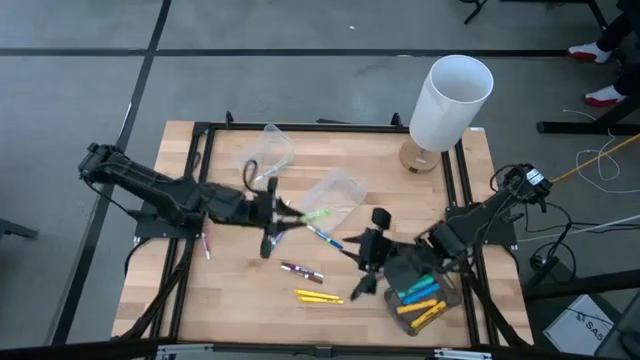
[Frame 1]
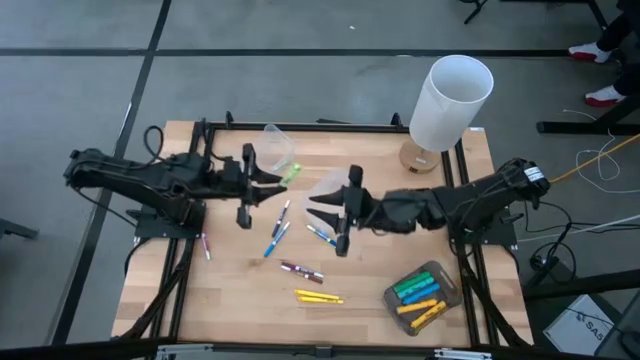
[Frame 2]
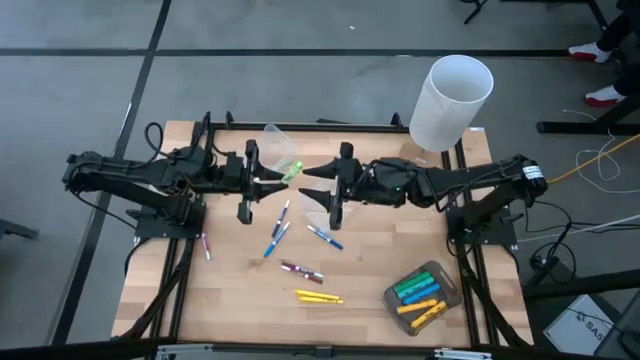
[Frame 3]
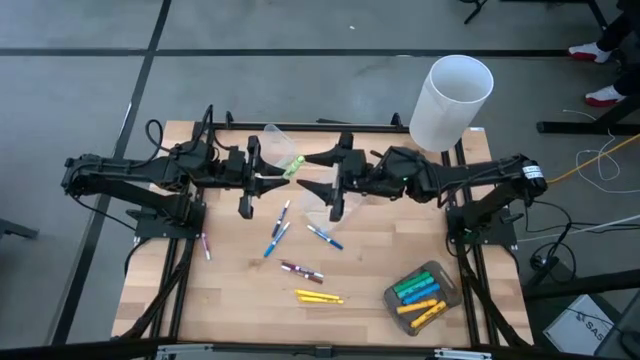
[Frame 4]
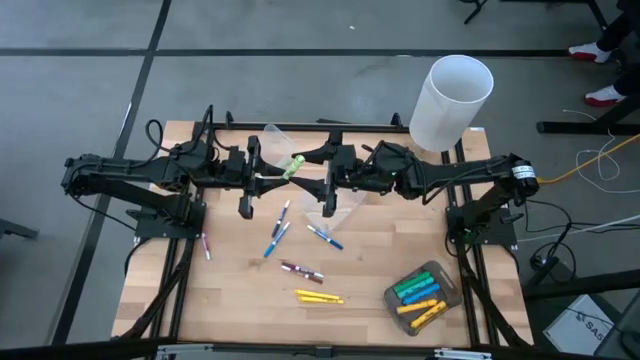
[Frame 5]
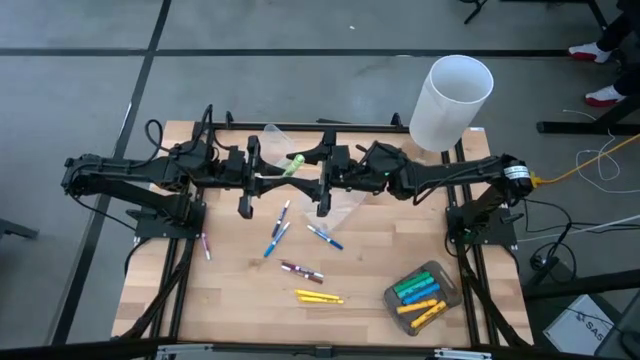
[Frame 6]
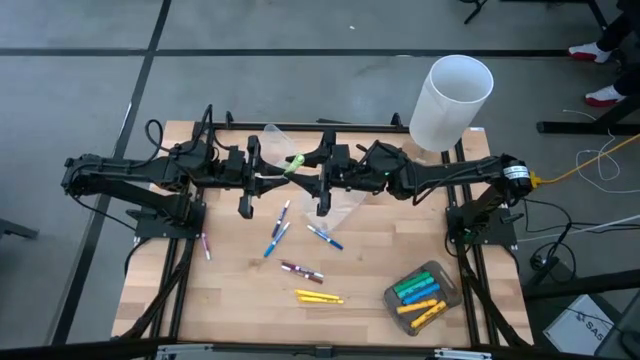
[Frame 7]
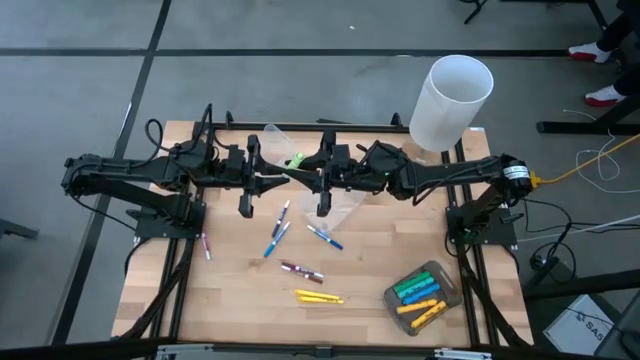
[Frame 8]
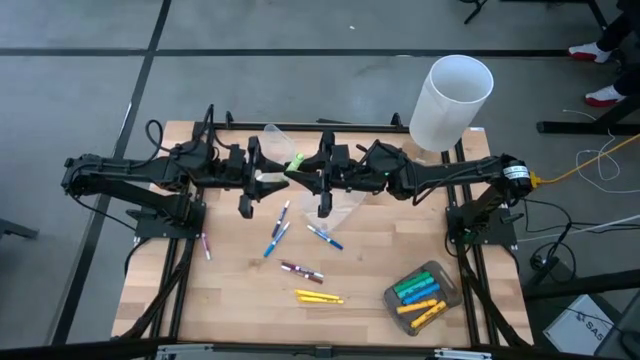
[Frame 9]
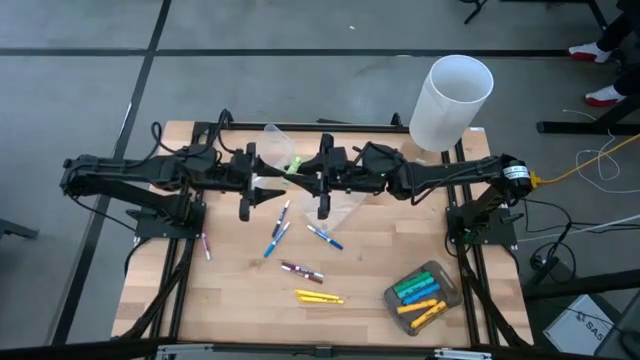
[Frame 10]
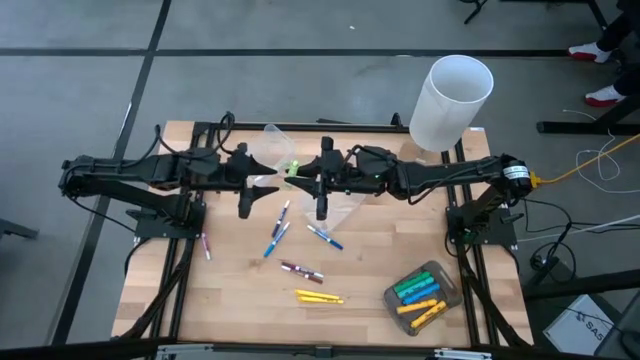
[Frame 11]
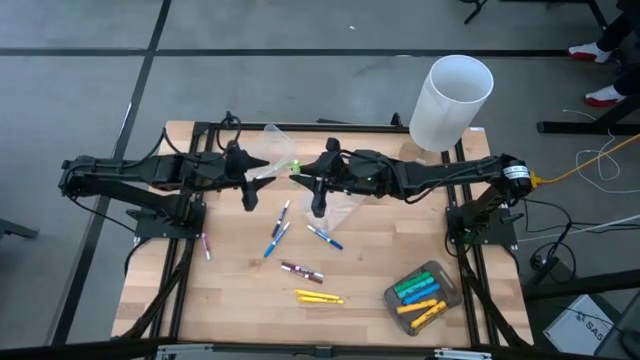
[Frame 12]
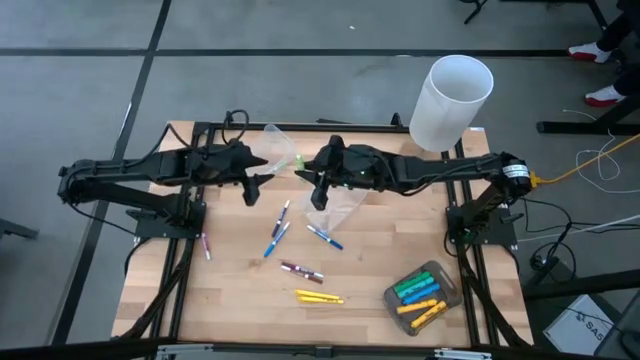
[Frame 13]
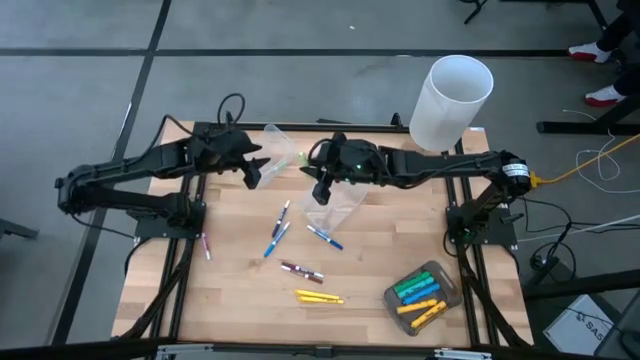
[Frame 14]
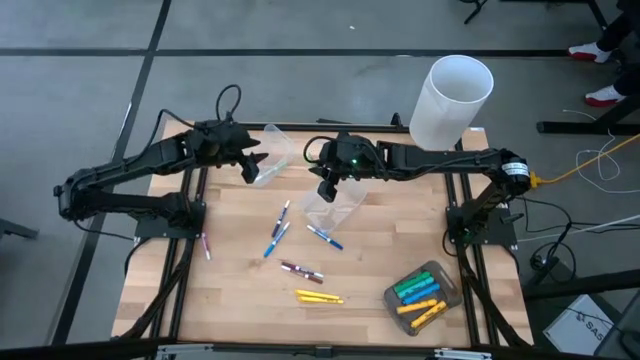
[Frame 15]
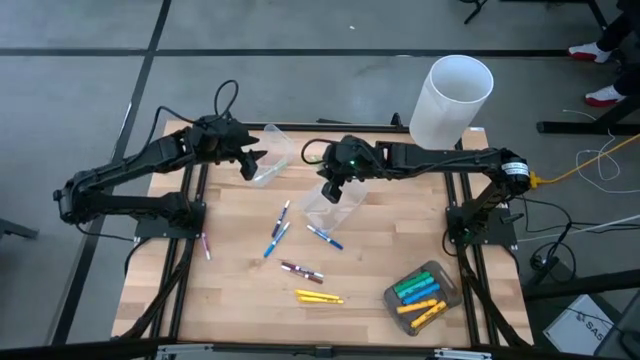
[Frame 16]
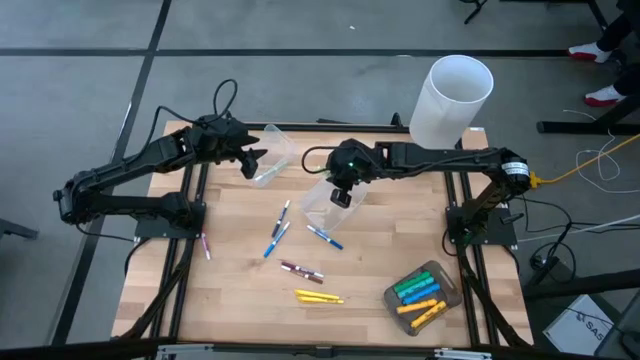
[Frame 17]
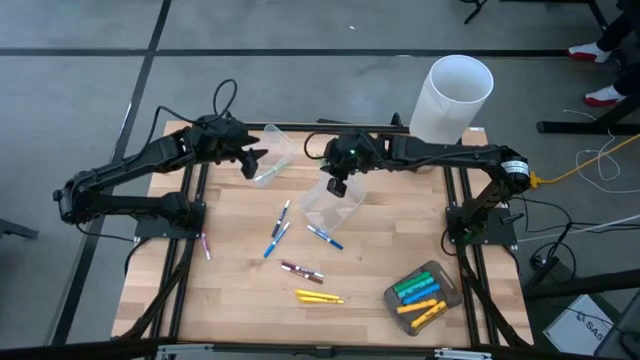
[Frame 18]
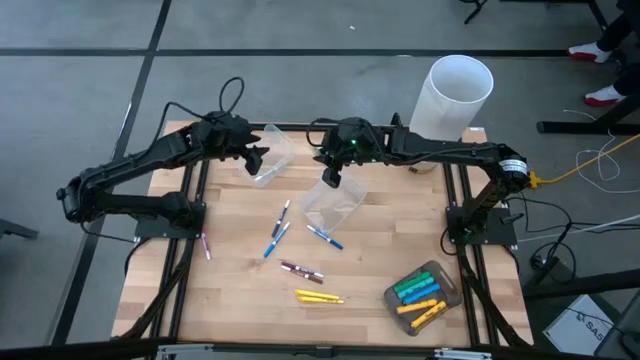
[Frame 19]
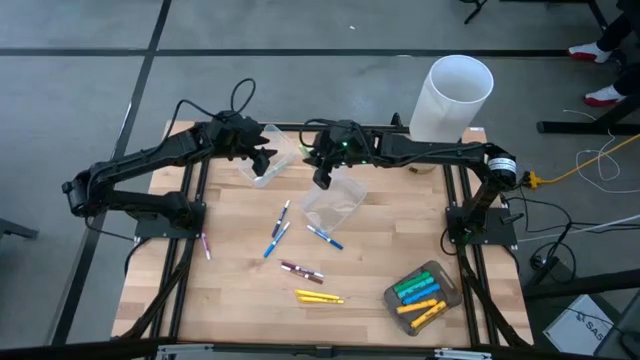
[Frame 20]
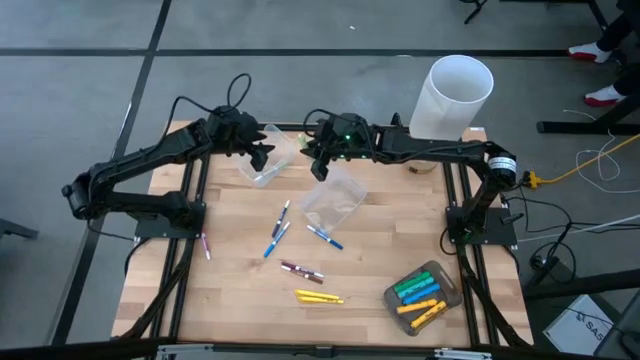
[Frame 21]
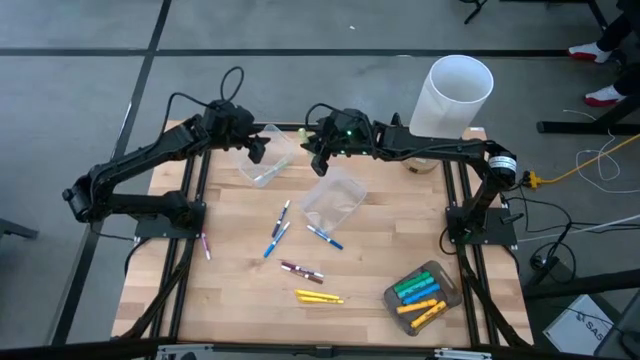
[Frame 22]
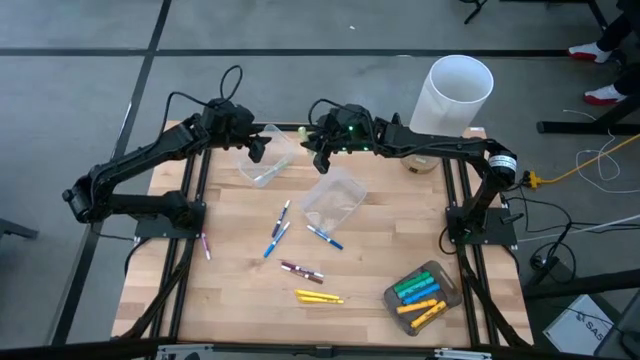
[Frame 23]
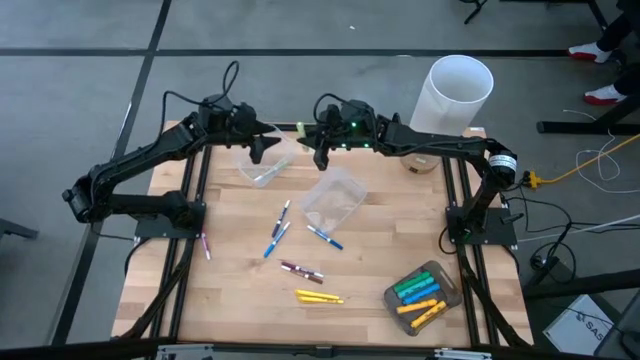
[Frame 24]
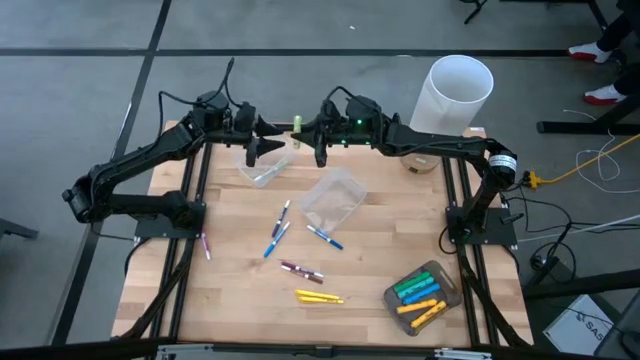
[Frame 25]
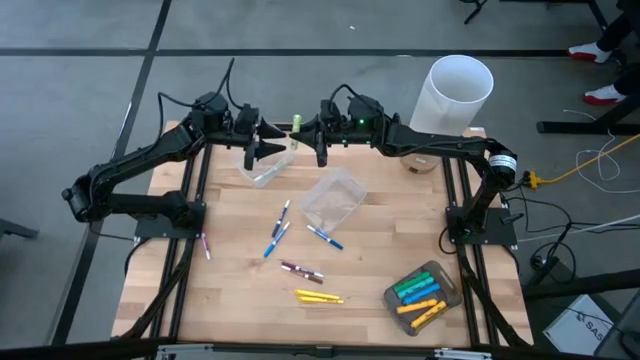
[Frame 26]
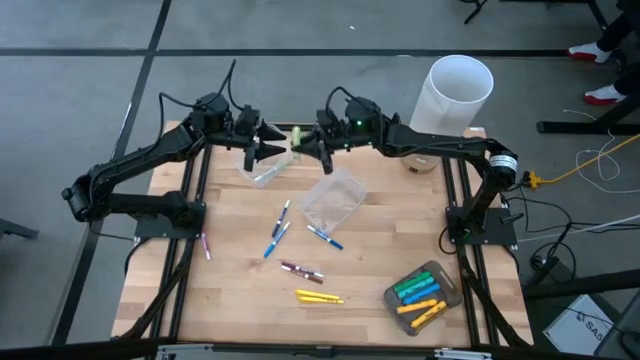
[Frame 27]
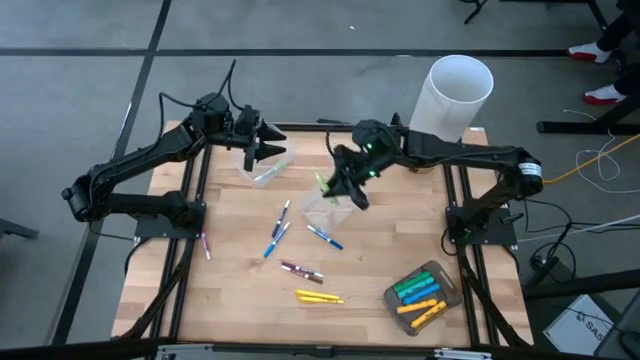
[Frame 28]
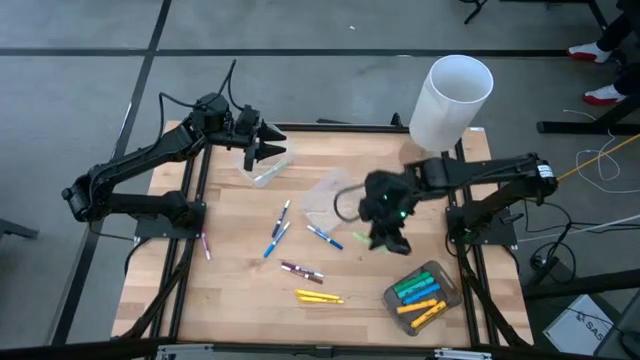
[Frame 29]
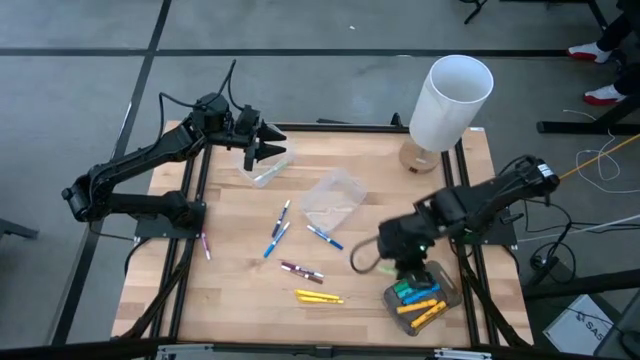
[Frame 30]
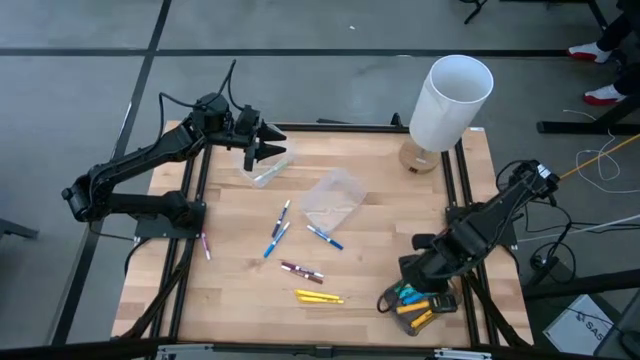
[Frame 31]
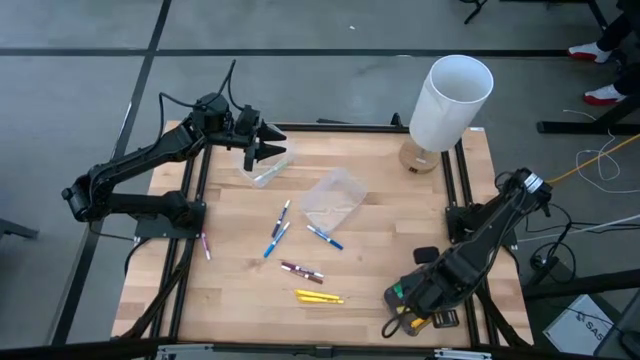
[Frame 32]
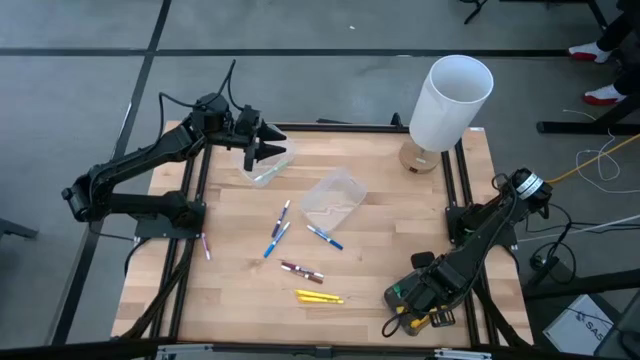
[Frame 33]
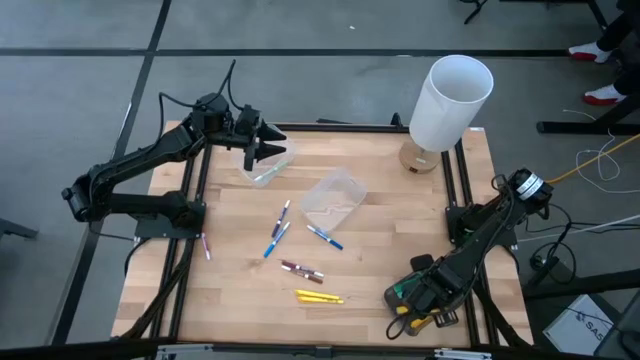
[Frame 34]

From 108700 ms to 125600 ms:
Task: Pick & Place Markers
Put the light green highlighter into the black bin

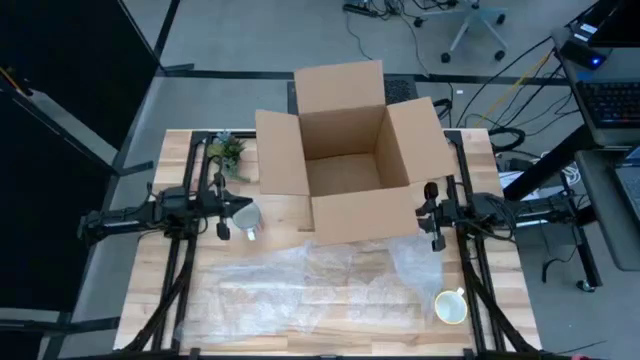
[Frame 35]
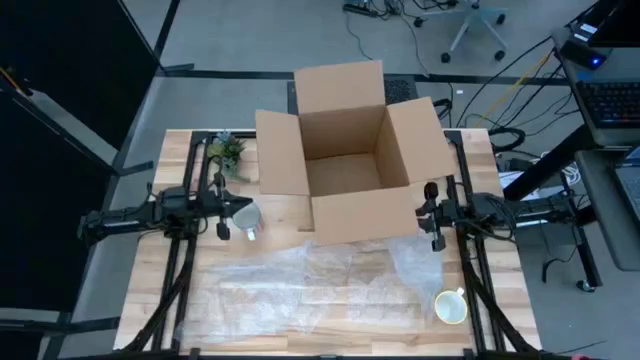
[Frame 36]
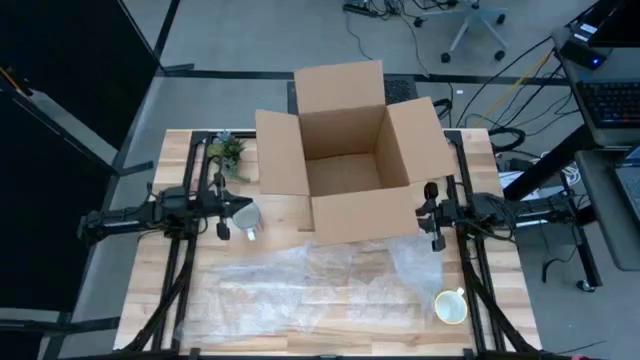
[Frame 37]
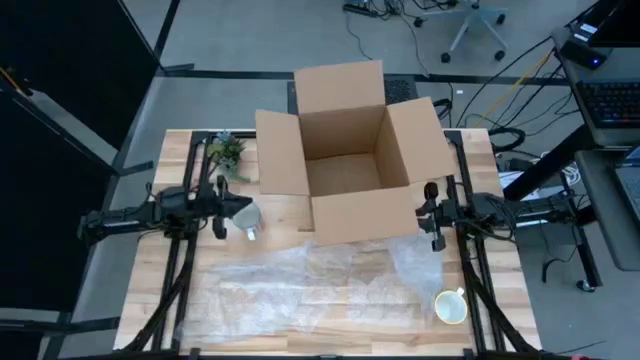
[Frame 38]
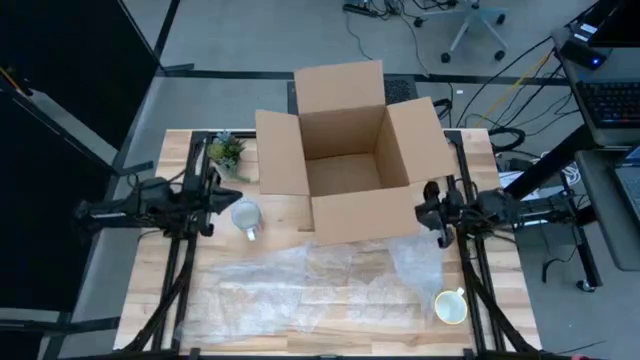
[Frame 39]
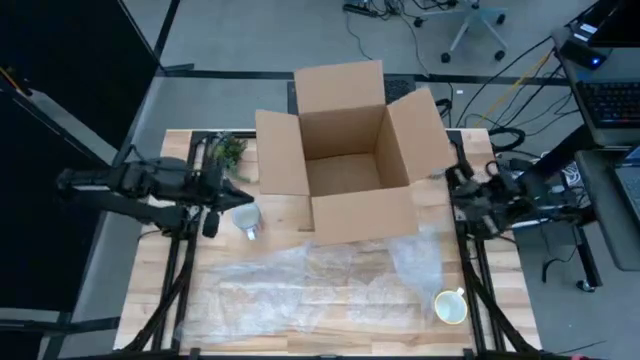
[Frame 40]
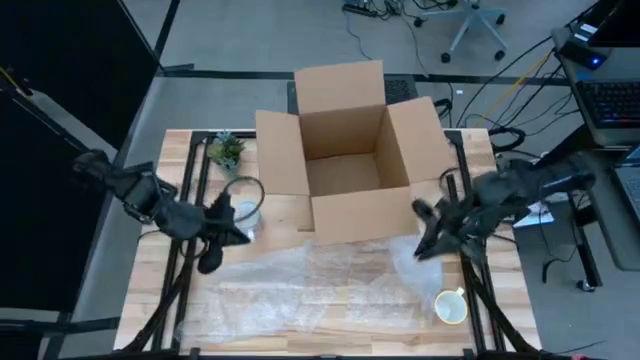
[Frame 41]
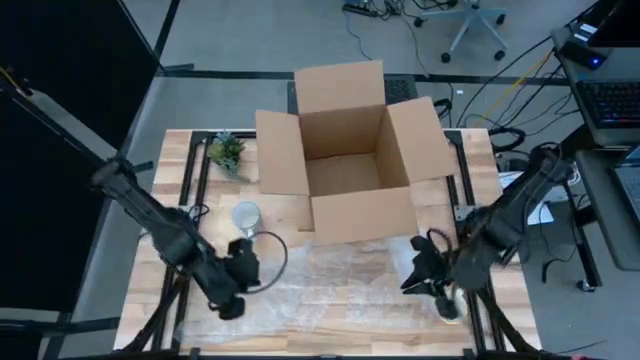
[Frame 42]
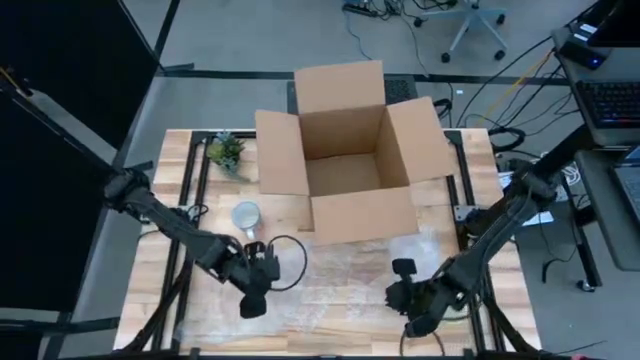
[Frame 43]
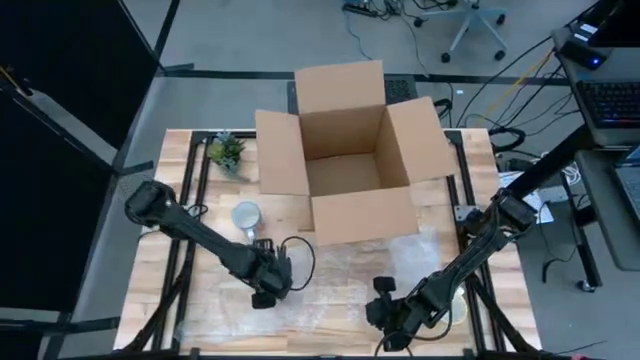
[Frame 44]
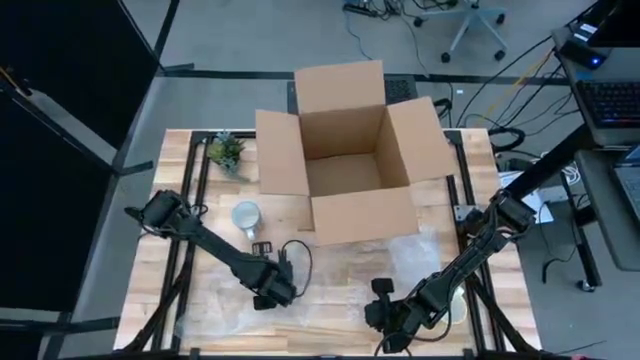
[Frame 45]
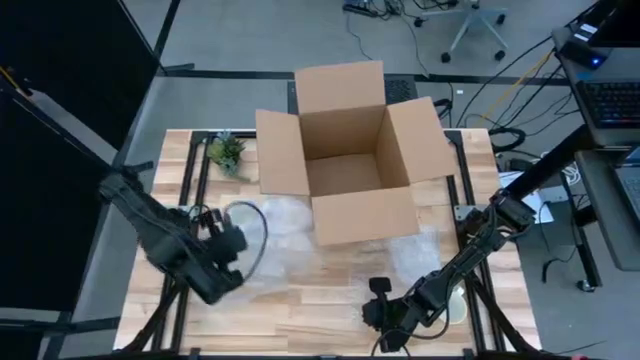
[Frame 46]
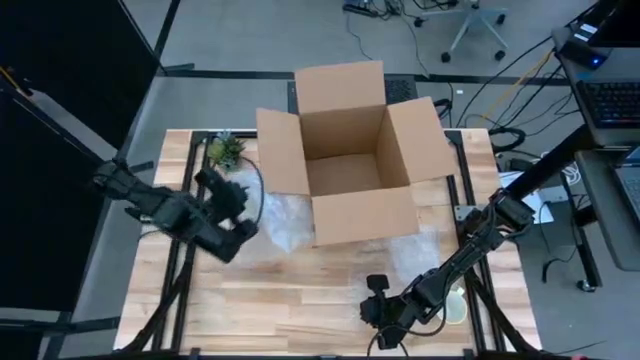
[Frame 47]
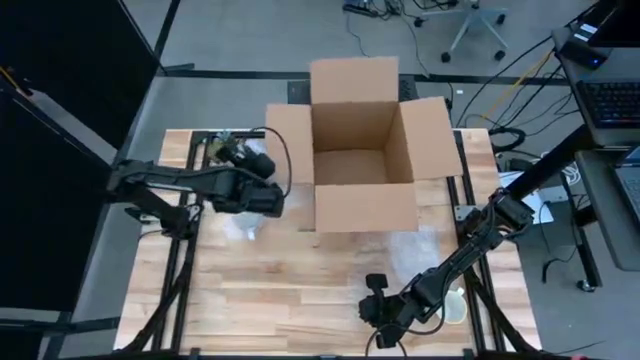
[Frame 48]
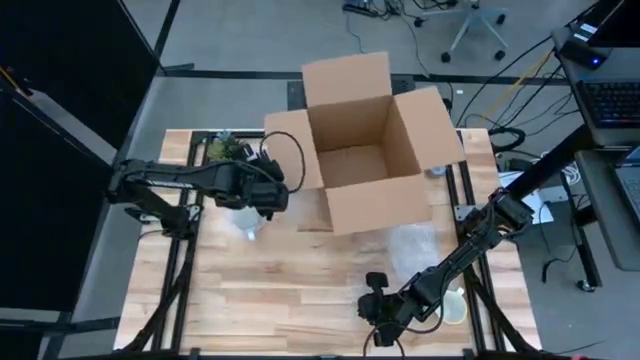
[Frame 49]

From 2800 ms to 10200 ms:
Task: wrap mug
Move the left bubble wrap to the top left
